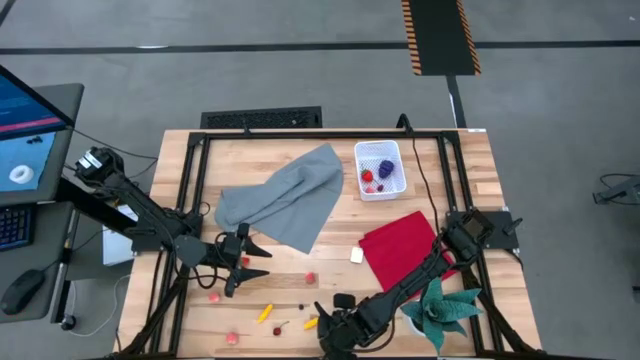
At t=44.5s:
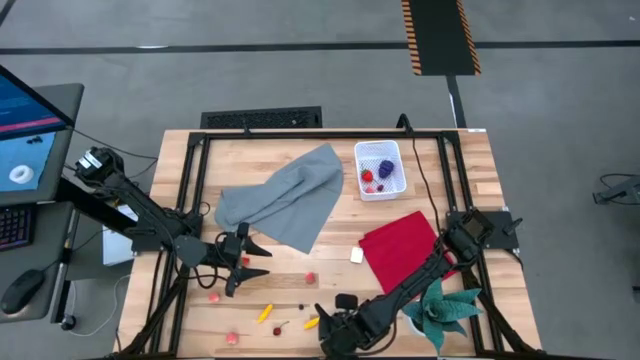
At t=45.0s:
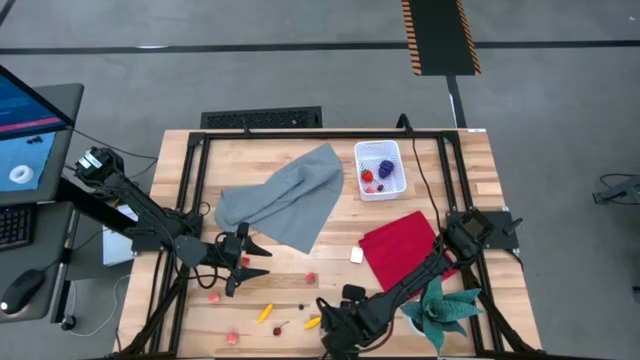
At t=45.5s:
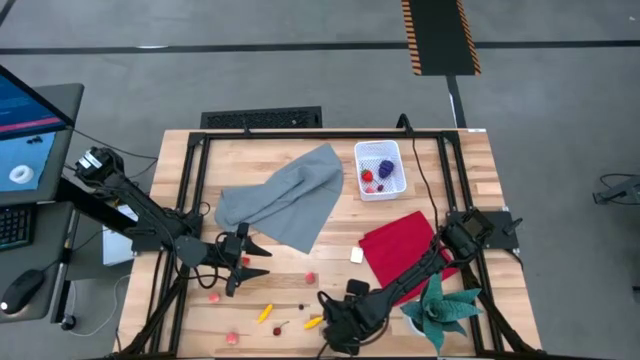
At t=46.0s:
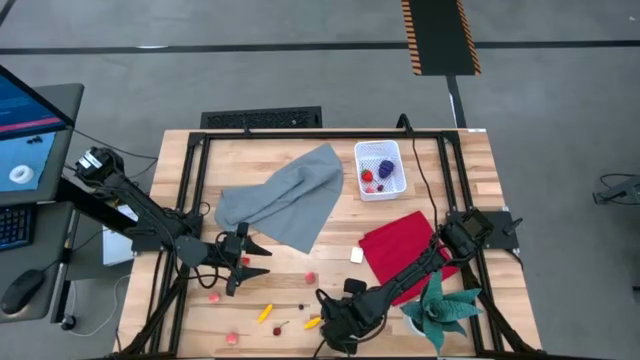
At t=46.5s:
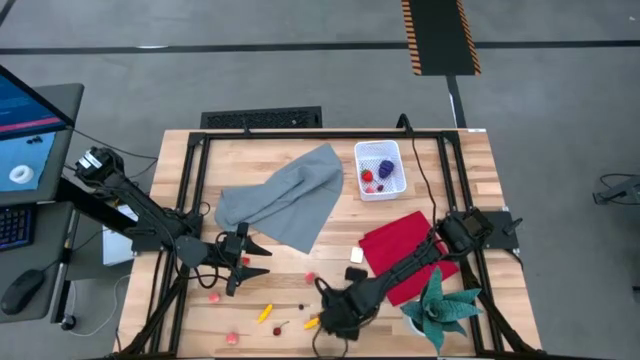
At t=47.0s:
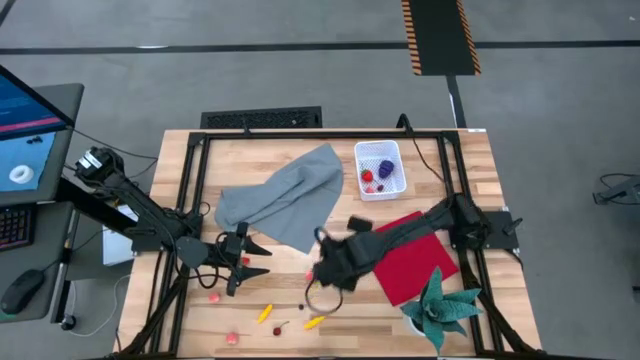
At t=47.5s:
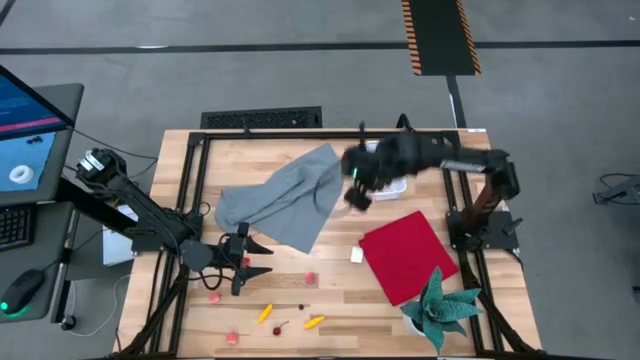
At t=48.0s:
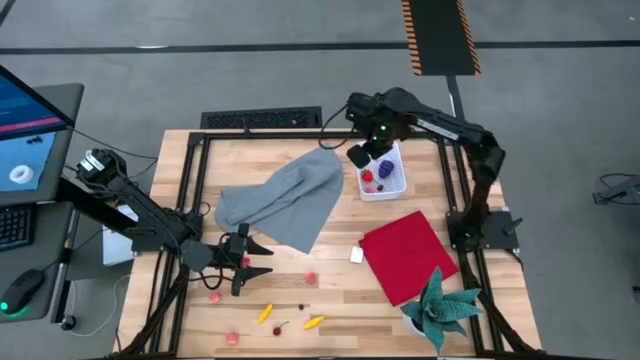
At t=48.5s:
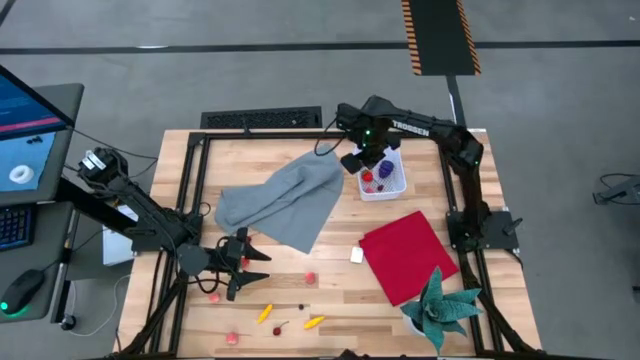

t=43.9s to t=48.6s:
Task: Pick and placing Produce into tupperware
Put the red cherry into the white bin

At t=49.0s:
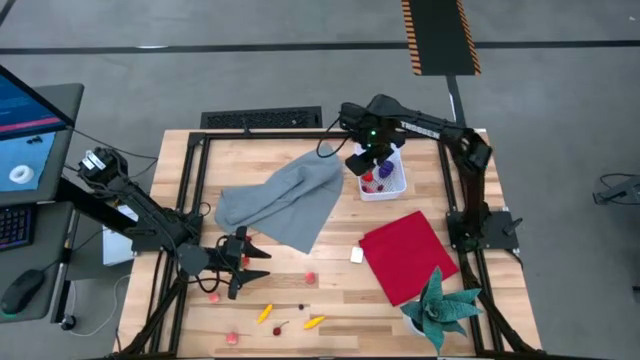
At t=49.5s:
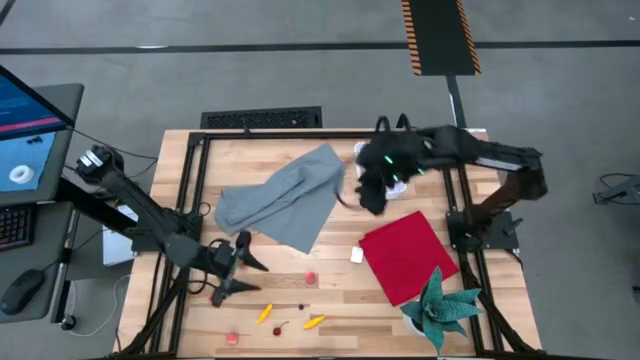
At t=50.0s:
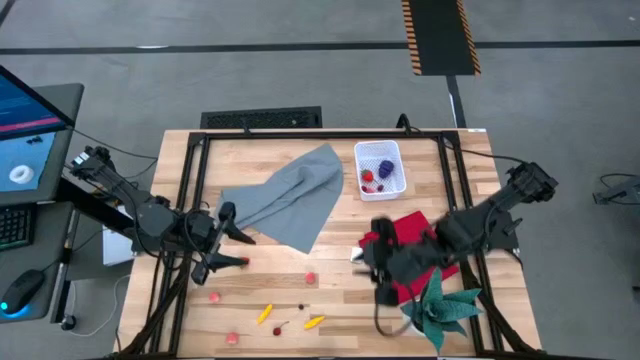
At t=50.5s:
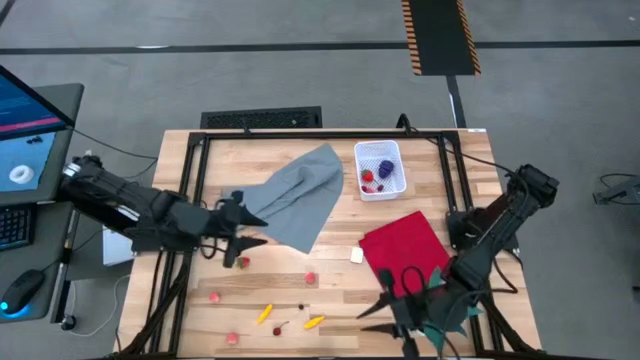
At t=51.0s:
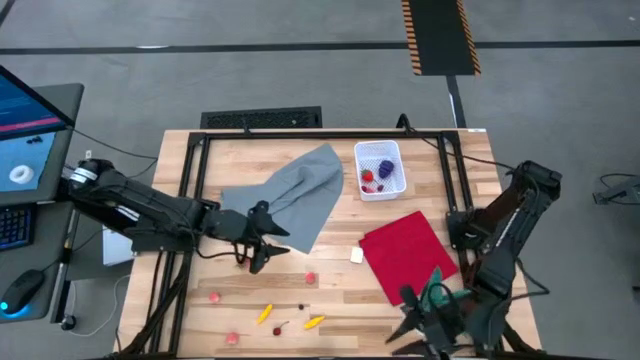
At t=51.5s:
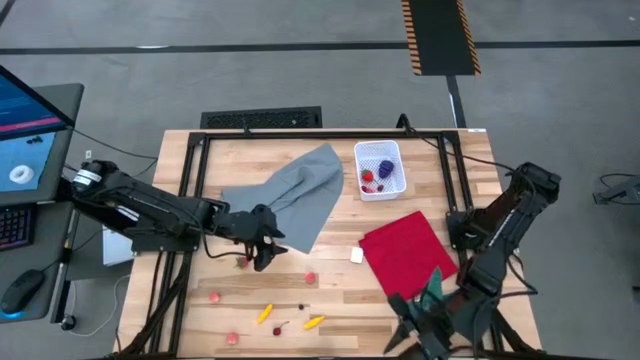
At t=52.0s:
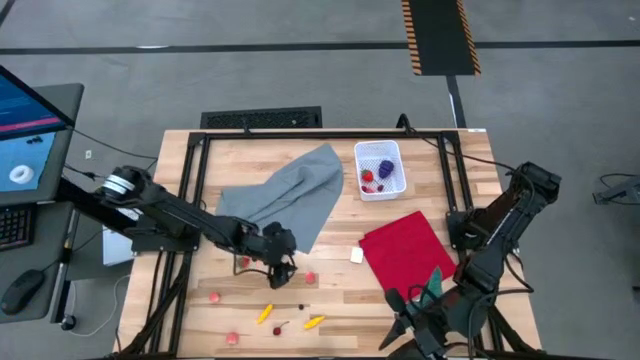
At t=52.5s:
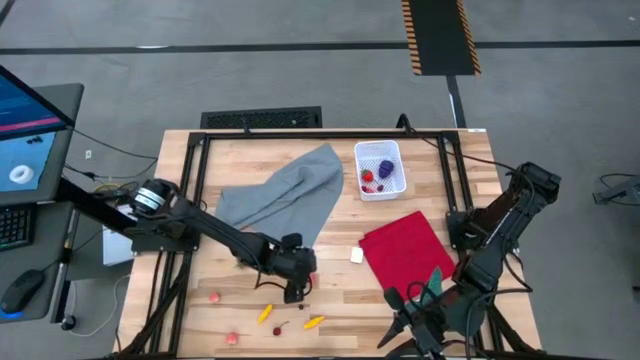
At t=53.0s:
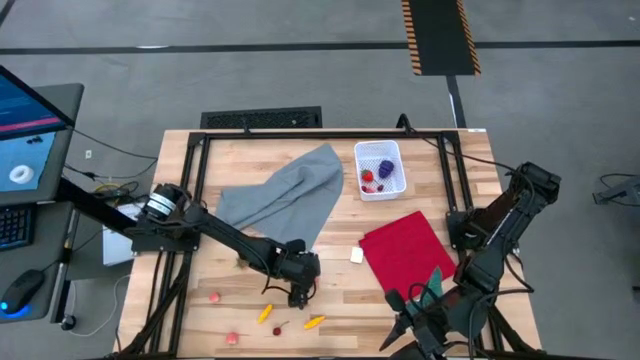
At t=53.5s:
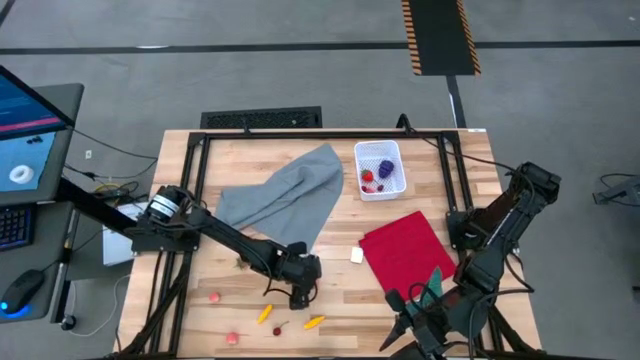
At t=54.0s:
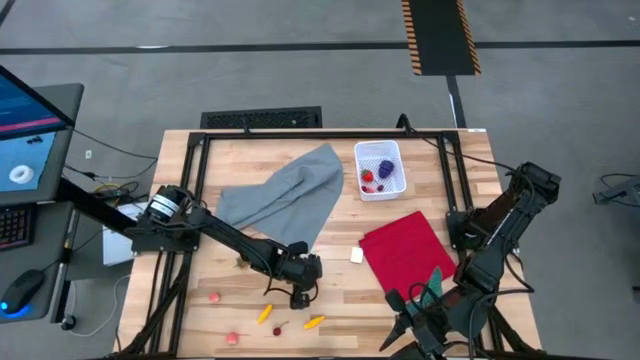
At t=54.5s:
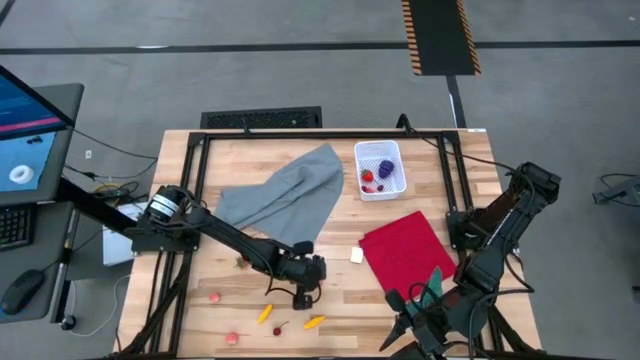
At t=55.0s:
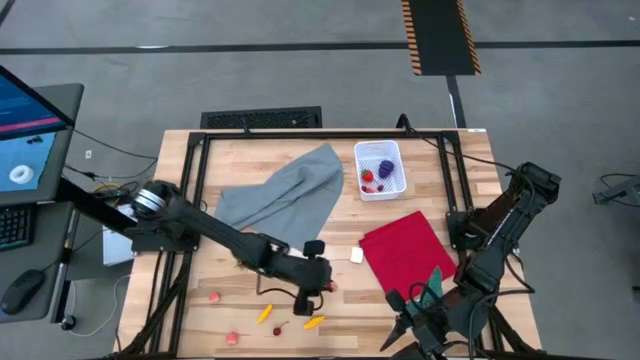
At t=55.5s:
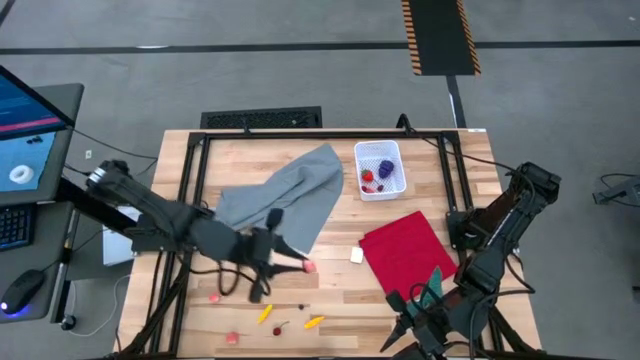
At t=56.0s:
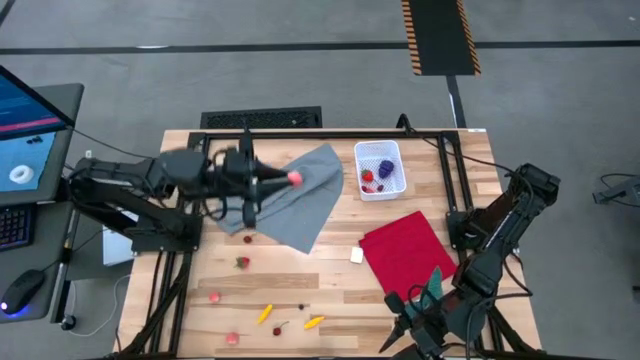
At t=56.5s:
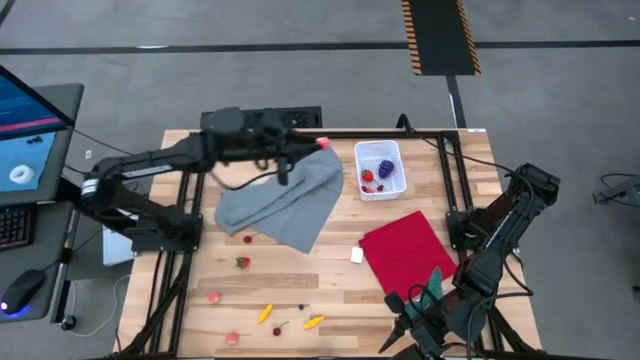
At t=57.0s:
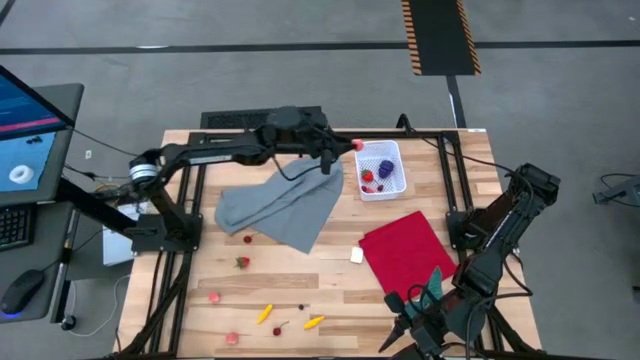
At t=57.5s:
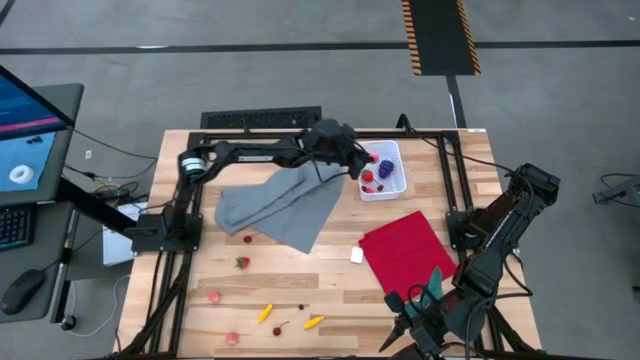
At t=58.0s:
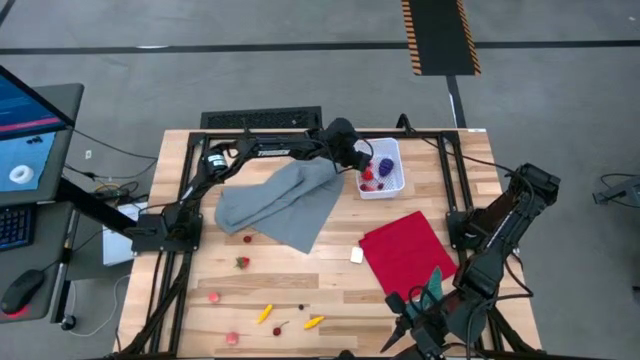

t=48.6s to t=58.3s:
Put the pink peach into the white bin

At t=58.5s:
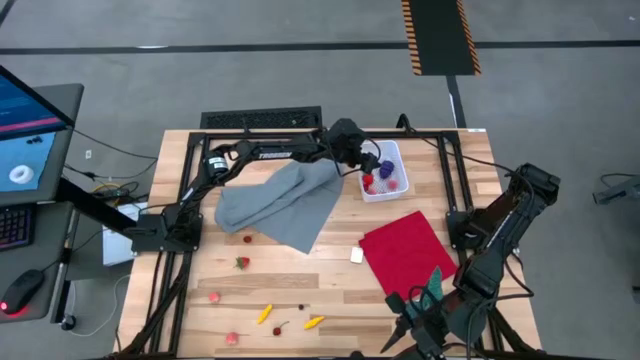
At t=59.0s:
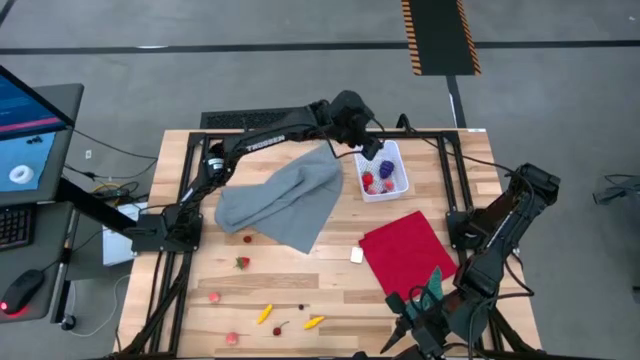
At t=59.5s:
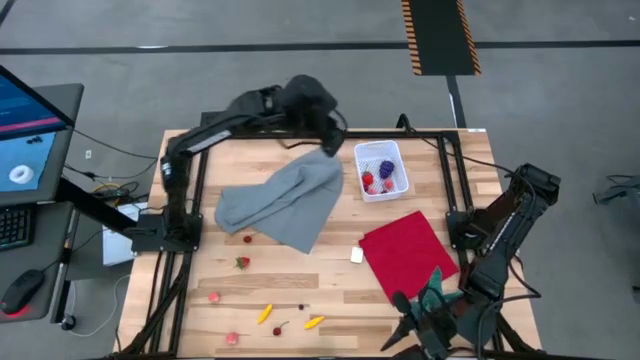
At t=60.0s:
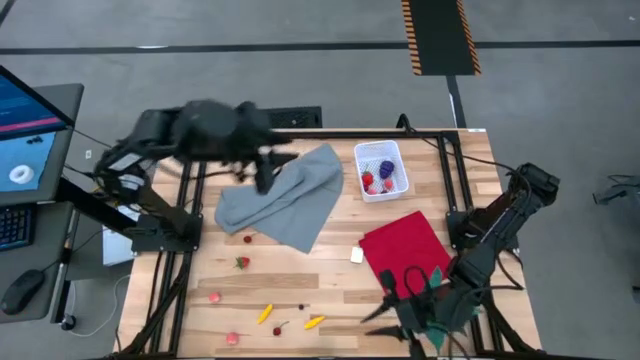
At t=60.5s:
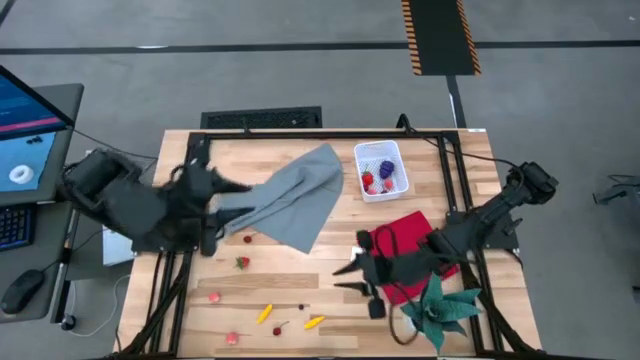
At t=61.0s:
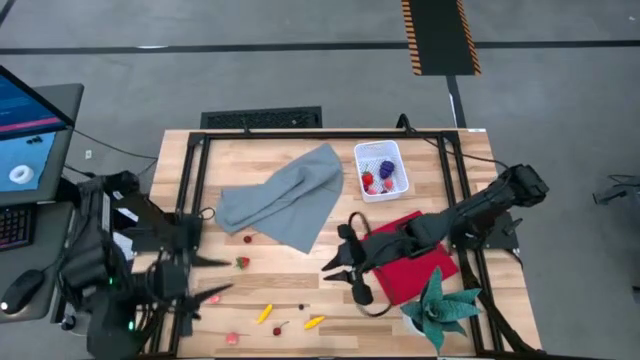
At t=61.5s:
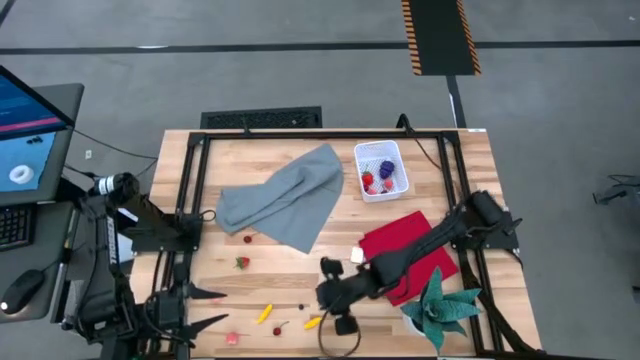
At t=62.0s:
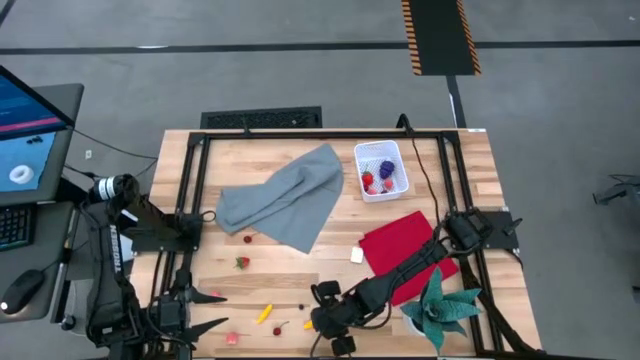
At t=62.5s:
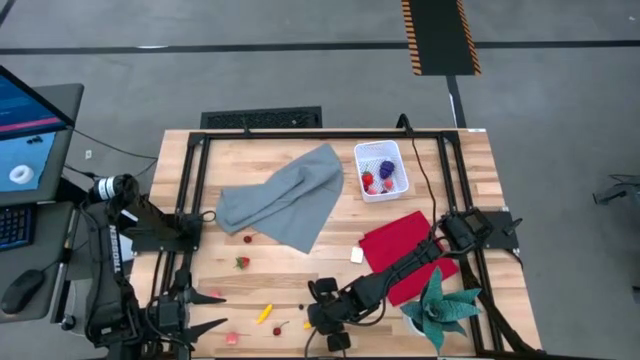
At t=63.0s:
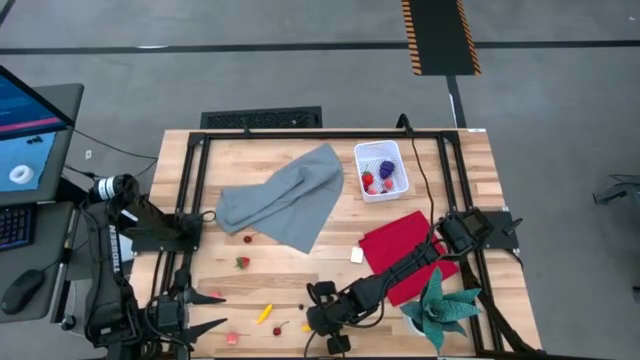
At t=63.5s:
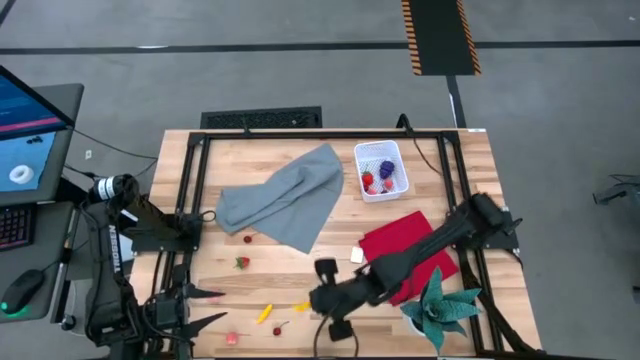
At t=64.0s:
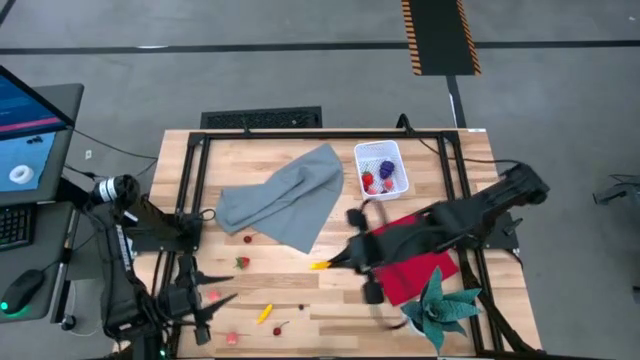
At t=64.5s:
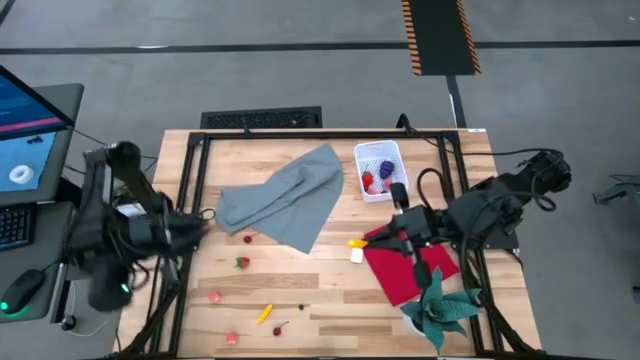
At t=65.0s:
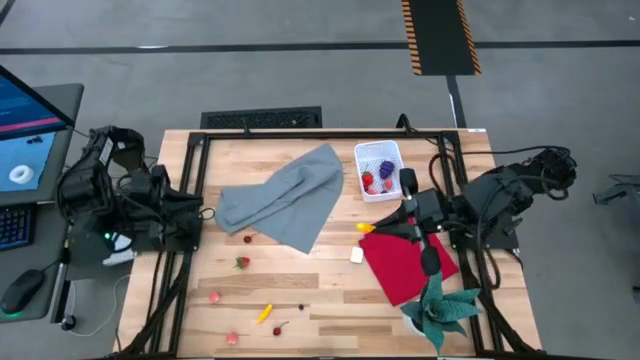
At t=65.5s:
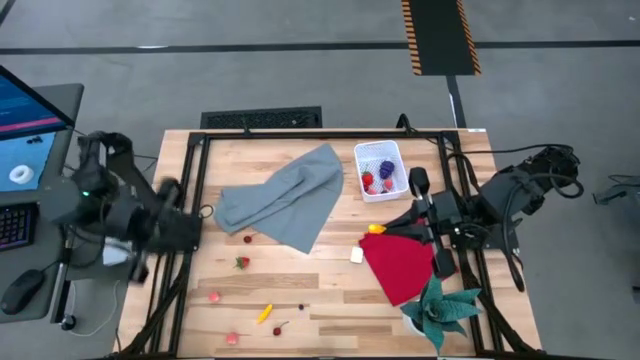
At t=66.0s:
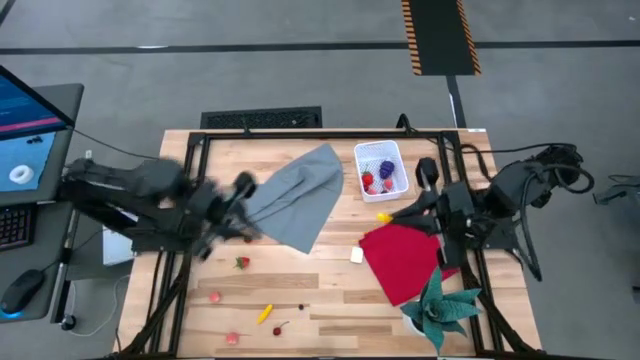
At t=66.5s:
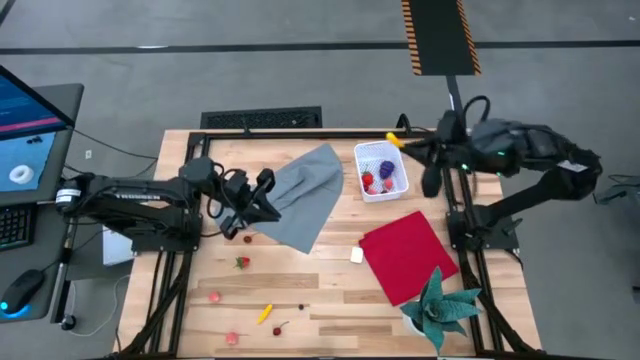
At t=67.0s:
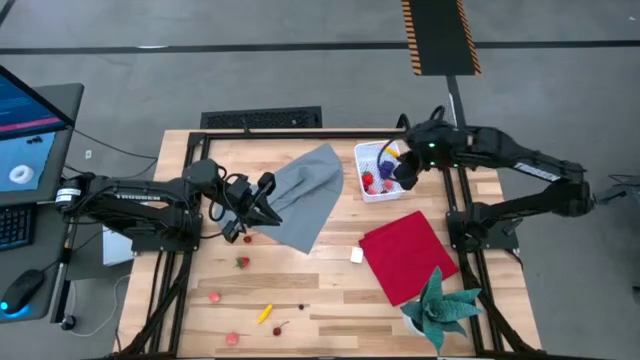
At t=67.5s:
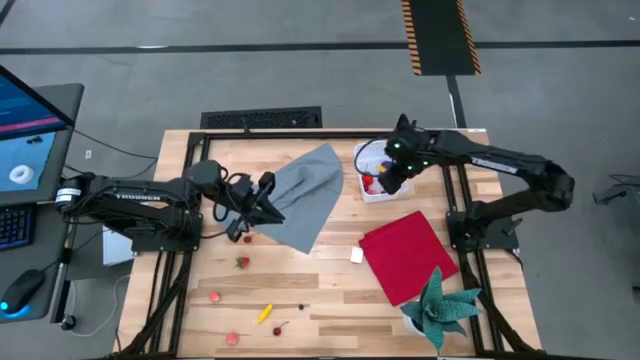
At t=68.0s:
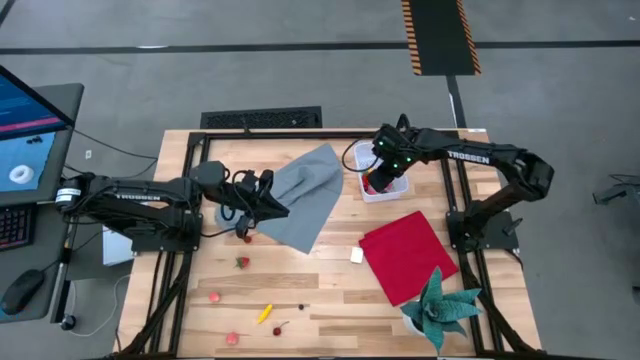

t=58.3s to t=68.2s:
Put the yellow corn into the white bin
